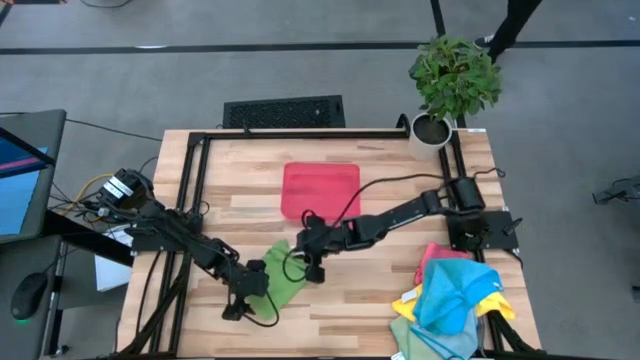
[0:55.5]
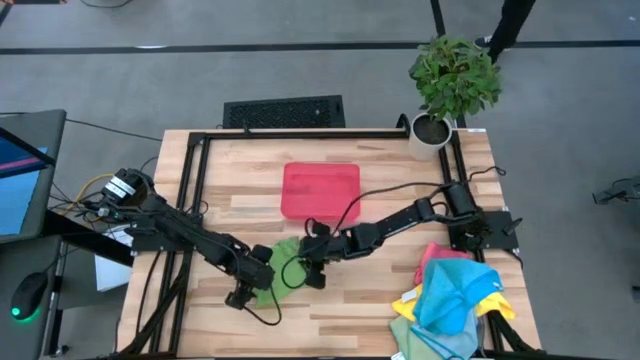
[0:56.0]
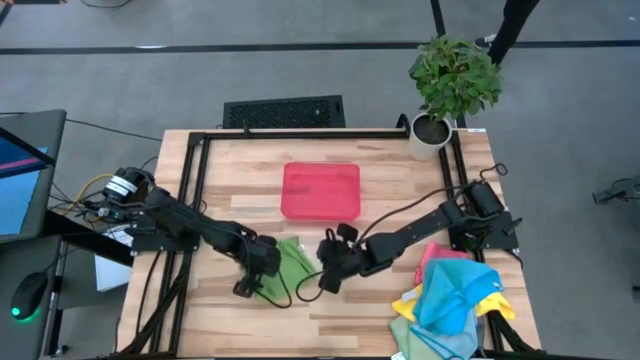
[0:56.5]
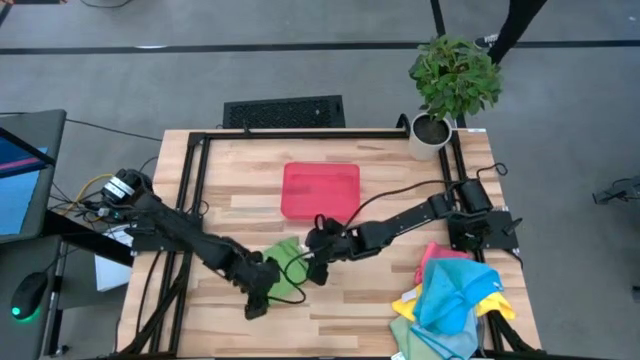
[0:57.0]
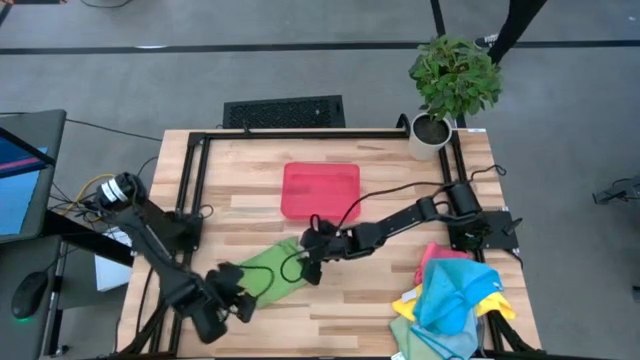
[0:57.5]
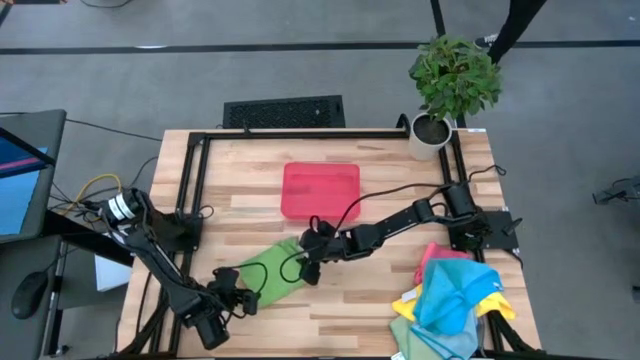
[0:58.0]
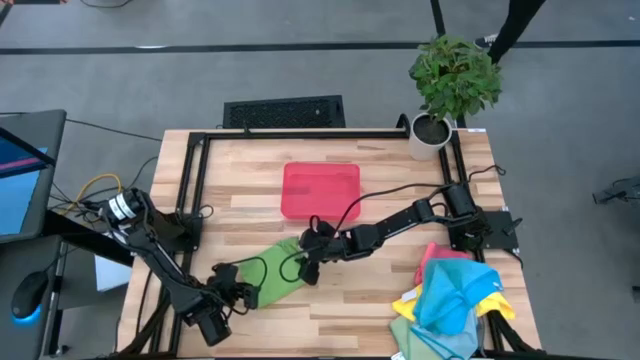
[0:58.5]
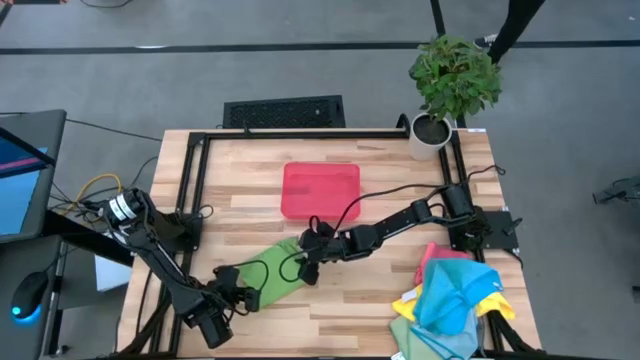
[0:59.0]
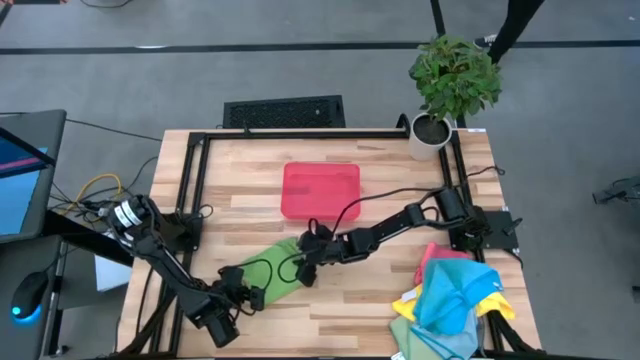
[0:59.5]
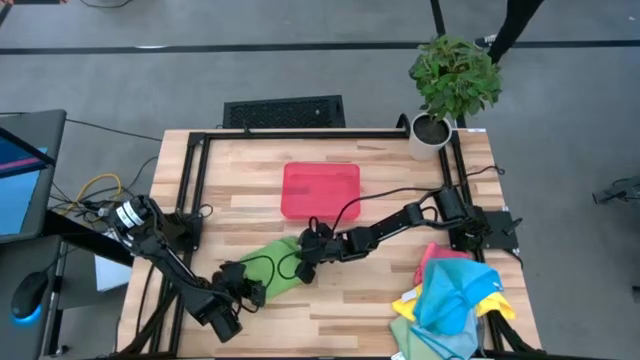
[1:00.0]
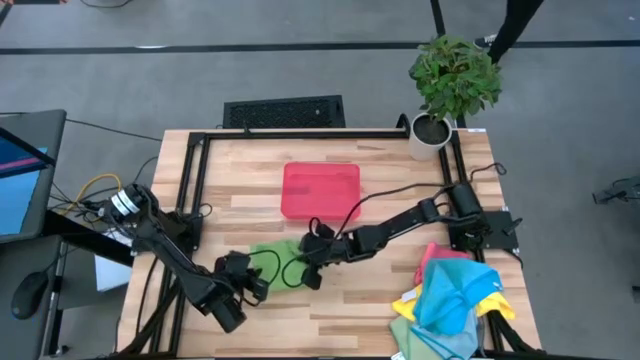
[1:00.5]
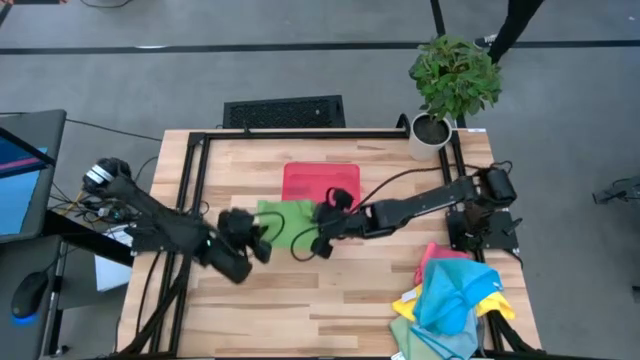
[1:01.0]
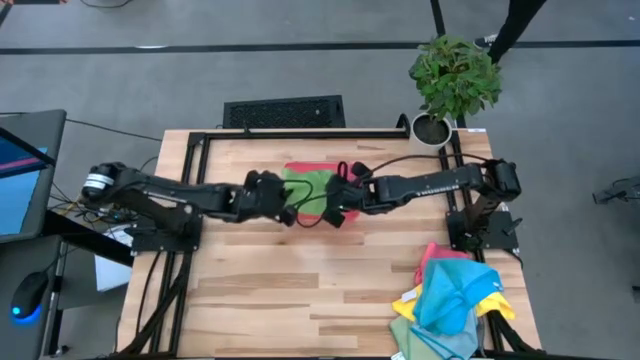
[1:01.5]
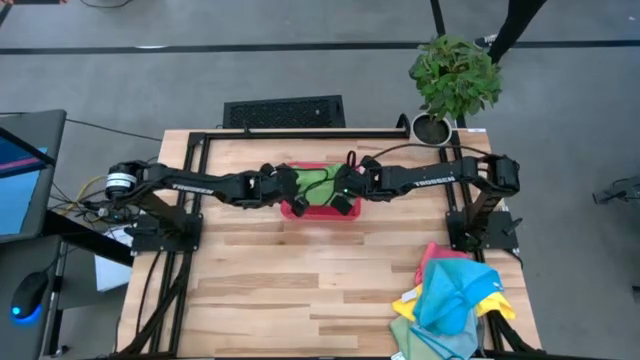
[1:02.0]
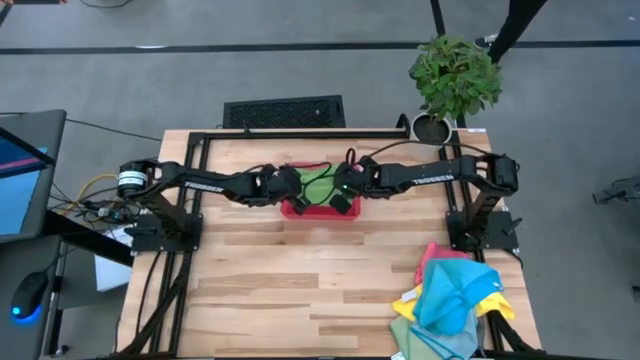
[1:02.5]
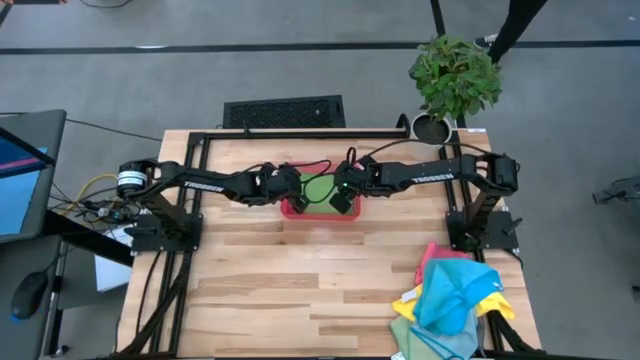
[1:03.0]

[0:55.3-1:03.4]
Task: Fold microfiber towels
Put the green microfiber cloth into the red bin

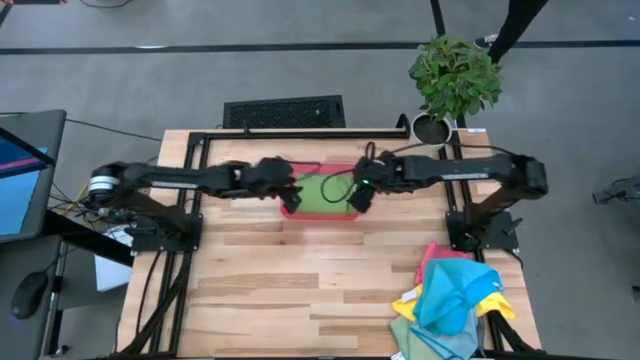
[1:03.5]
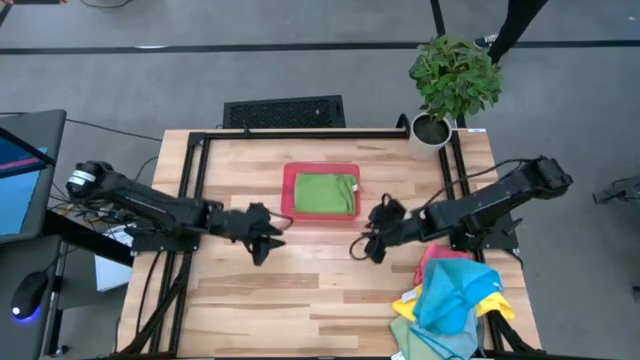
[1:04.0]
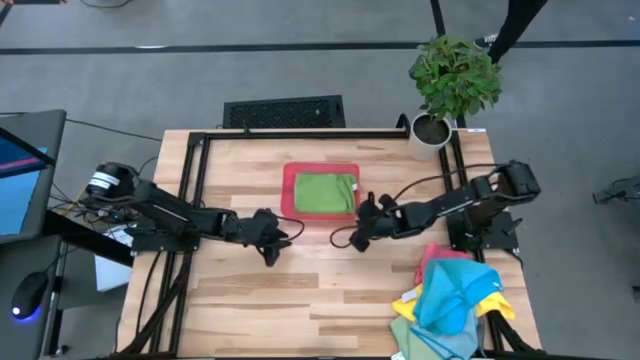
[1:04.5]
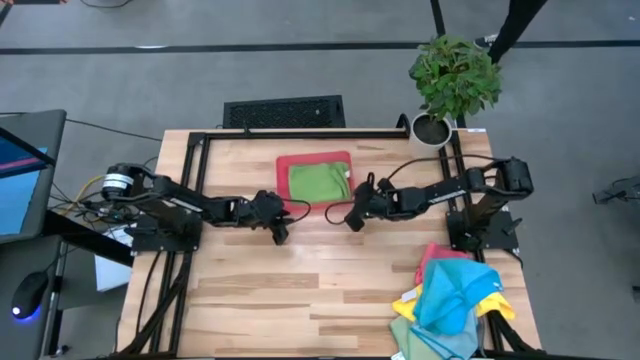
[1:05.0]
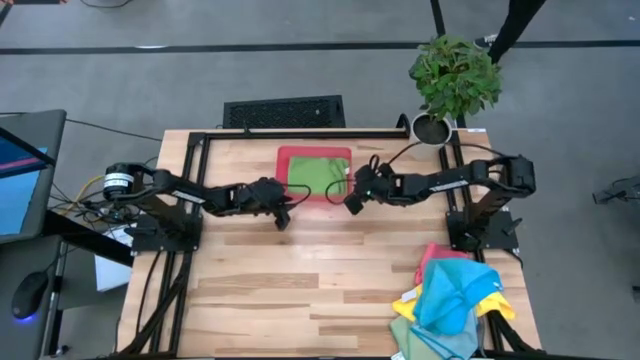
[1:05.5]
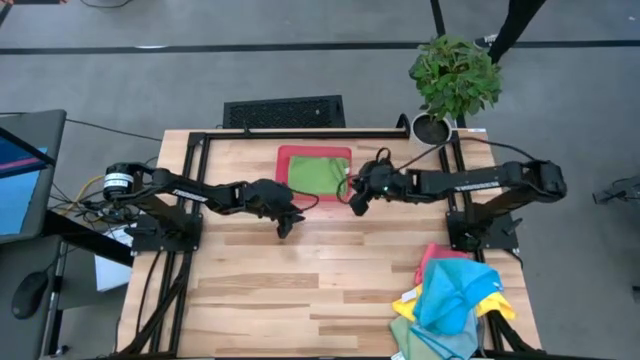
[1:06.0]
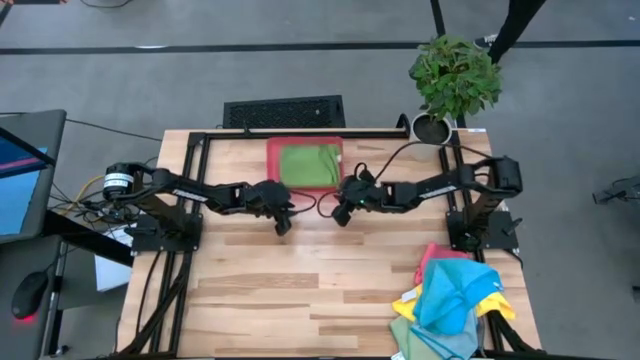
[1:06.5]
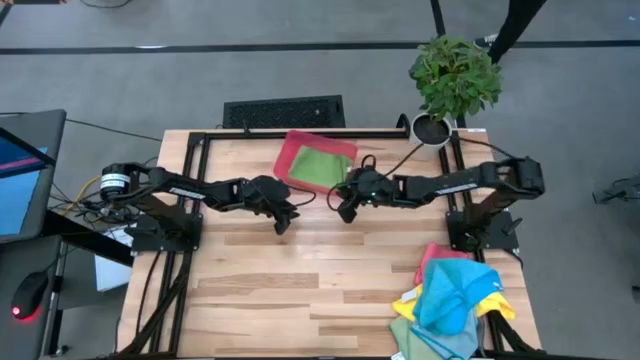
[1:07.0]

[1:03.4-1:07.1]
Move the red bin to the top of the table

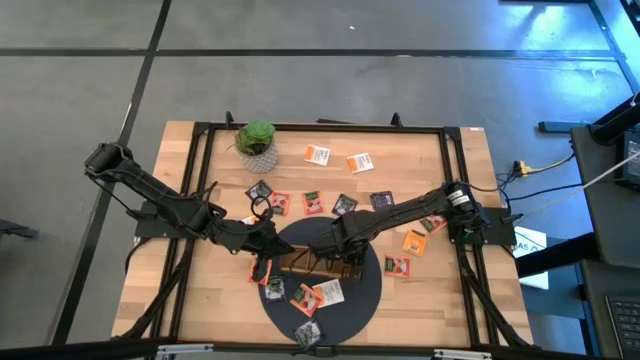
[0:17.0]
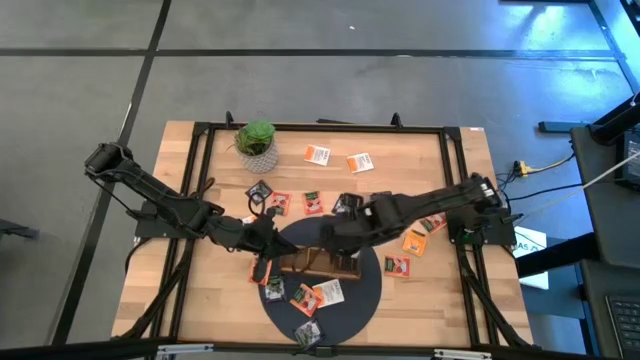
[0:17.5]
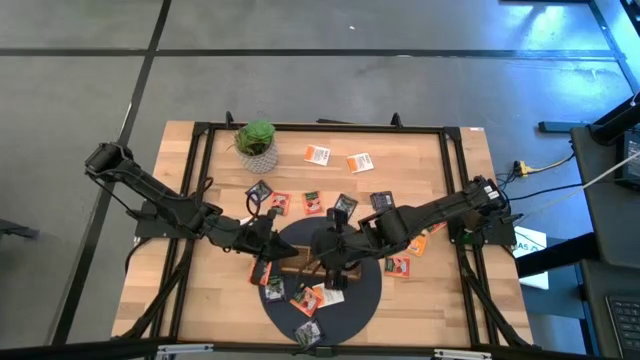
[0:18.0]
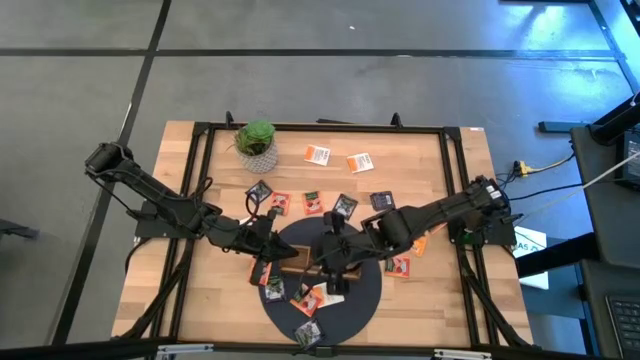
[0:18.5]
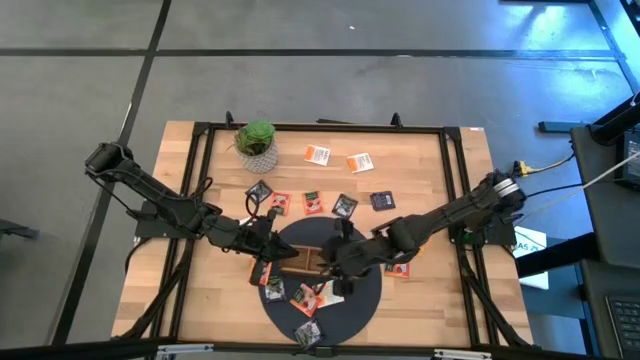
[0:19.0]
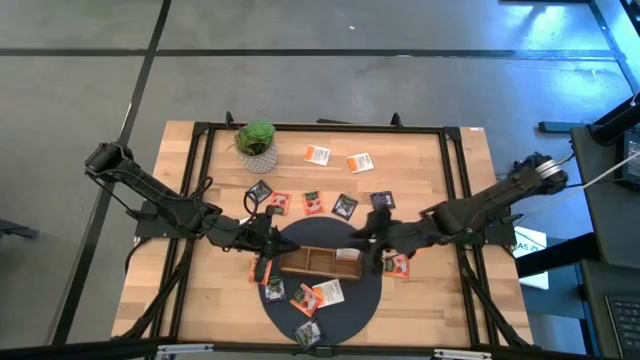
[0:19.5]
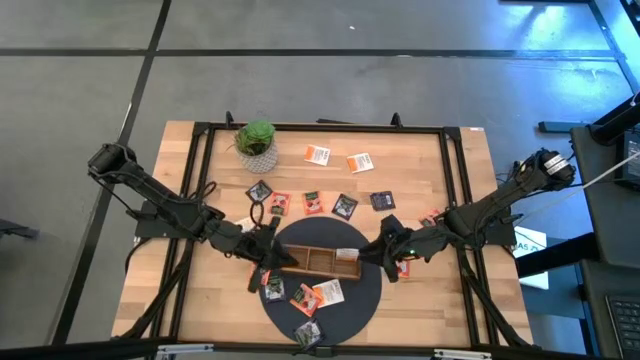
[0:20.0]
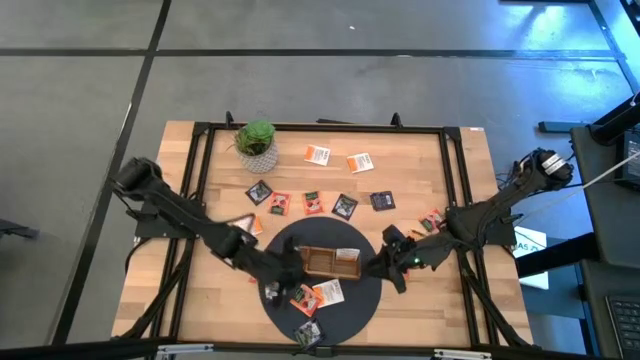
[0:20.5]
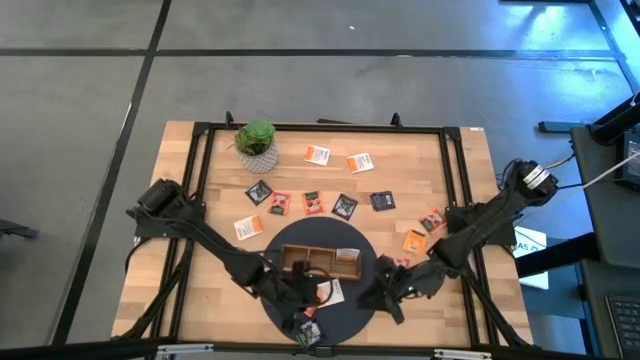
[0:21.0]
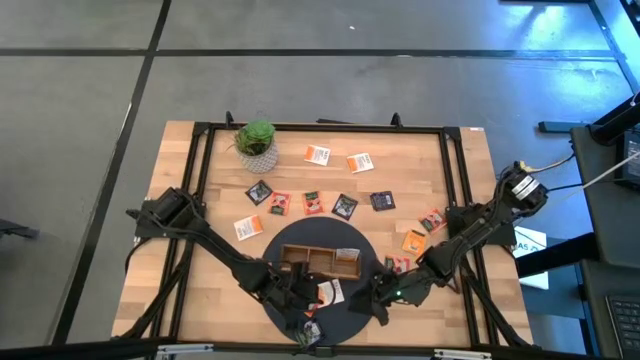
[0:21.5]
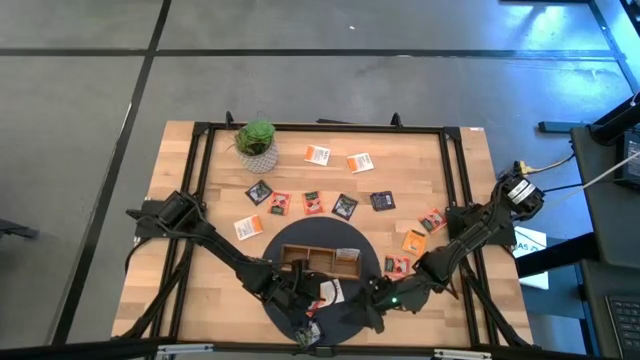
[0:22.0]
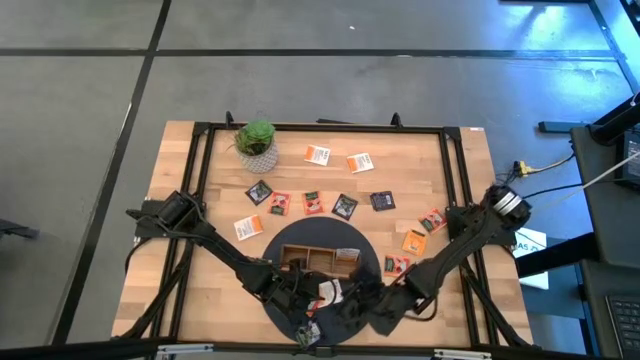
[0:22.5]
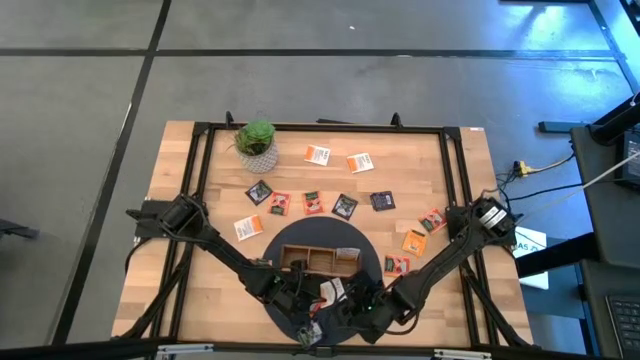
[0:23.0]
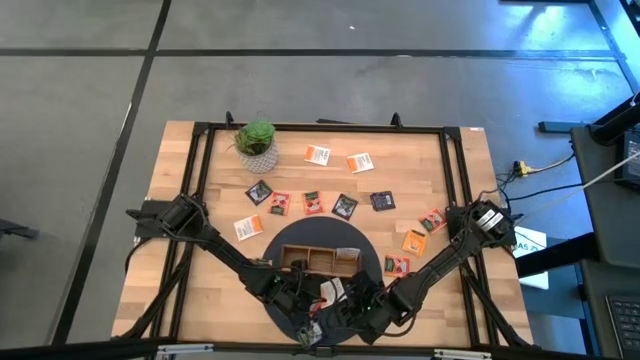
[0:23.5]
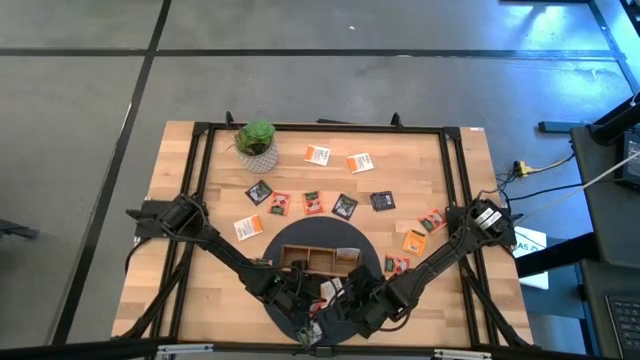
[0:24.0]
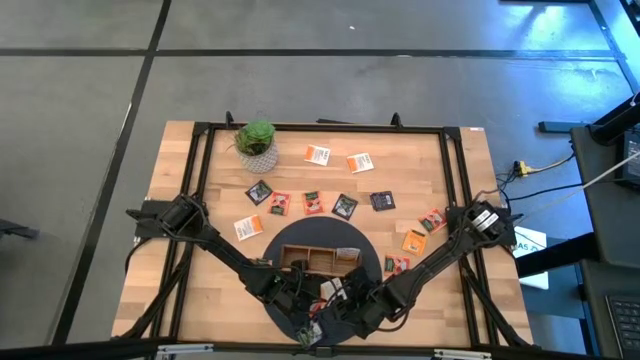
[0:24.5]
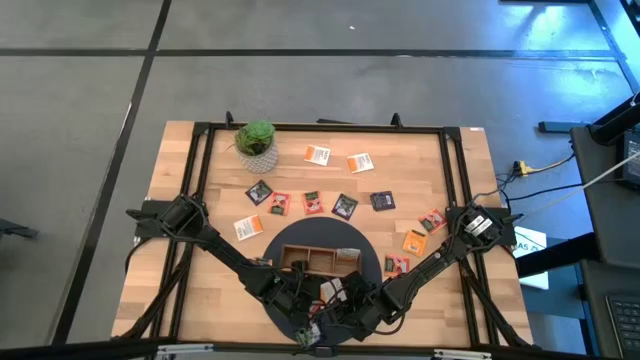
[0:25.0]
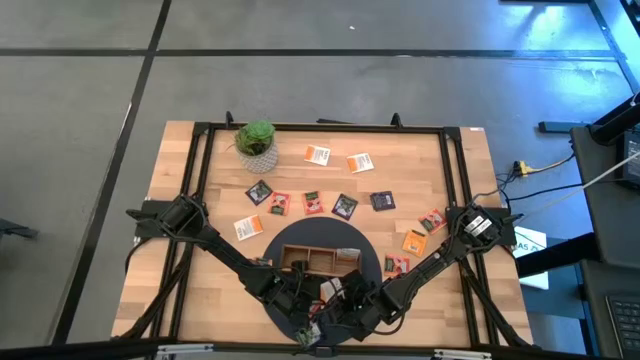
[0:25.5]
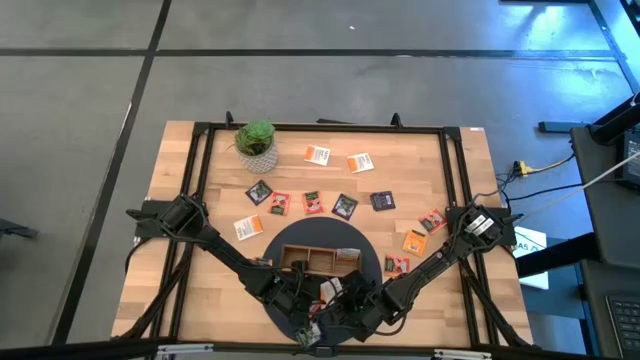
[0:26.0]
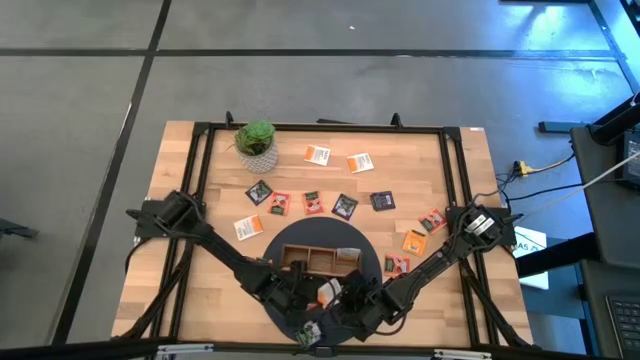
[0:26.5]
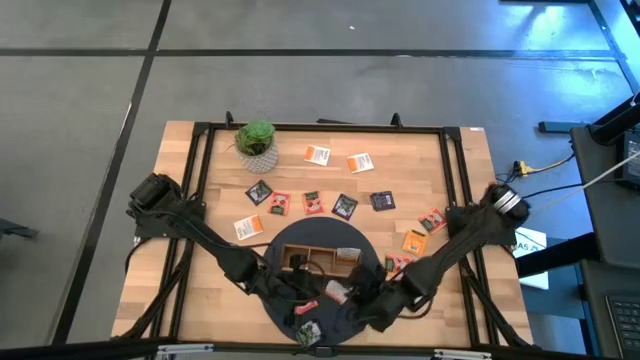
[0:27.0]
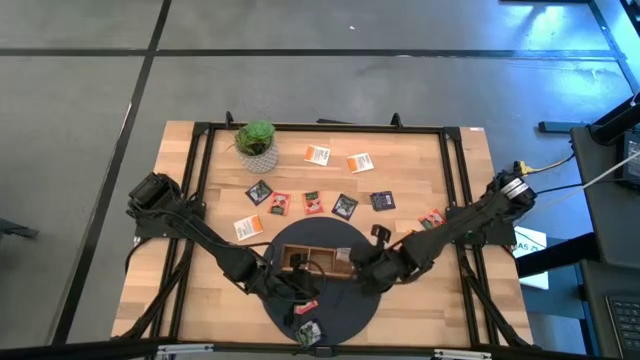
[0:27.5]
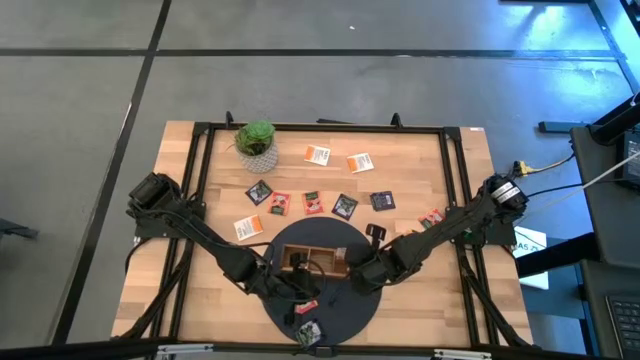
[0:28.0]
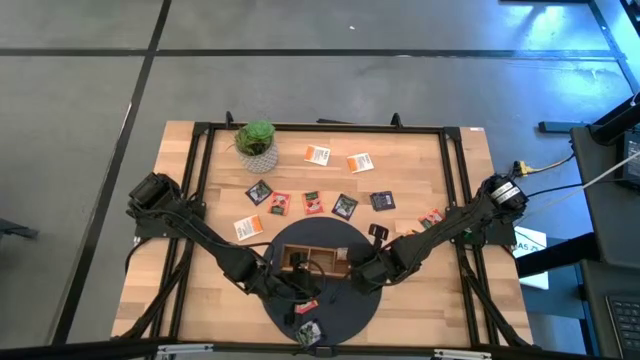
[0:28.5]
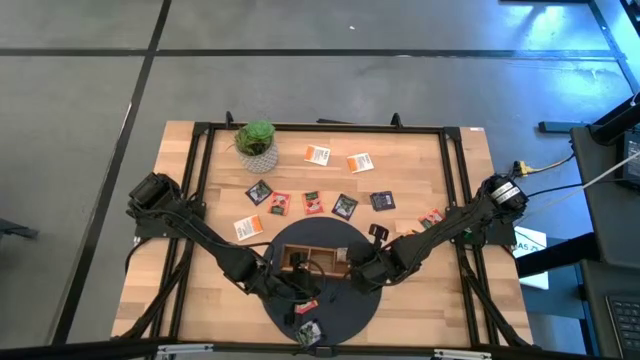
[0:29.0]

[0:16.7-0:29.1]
Task: Pick & Place Tea
Put the white tea bag into the right slot of the wooden organizer
